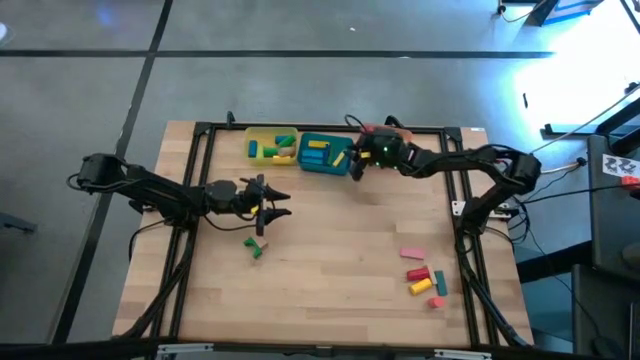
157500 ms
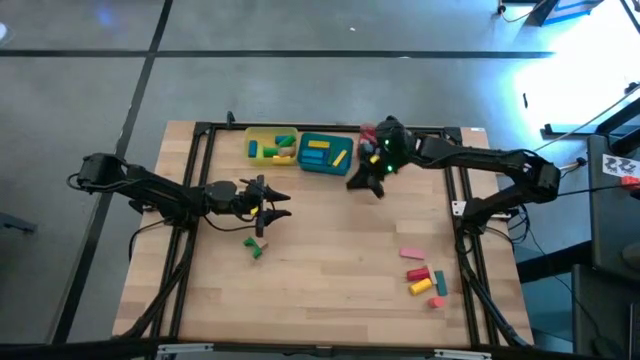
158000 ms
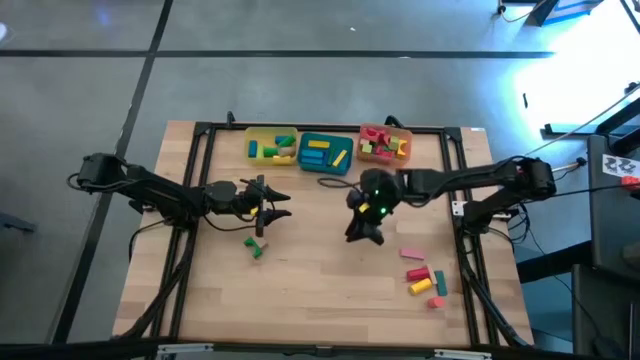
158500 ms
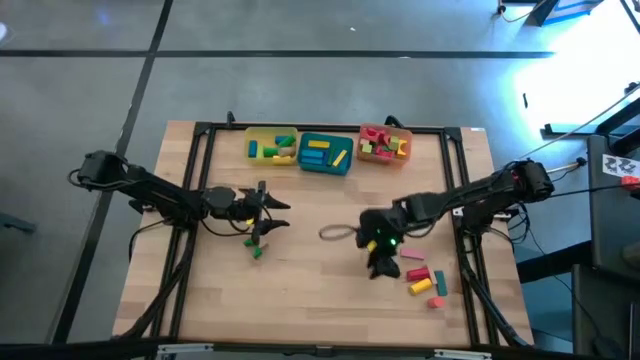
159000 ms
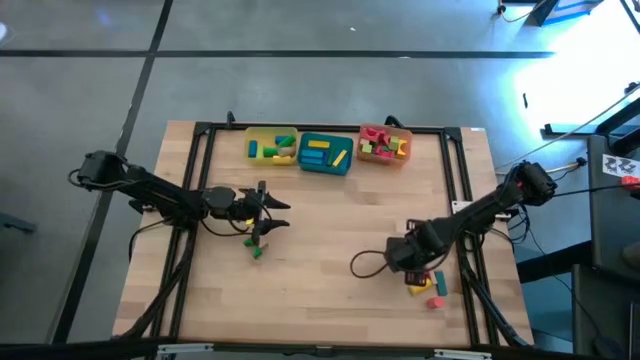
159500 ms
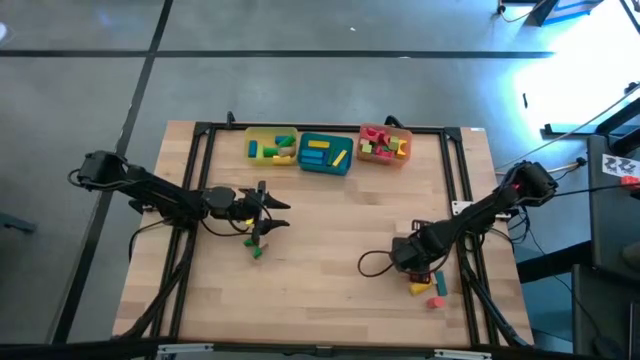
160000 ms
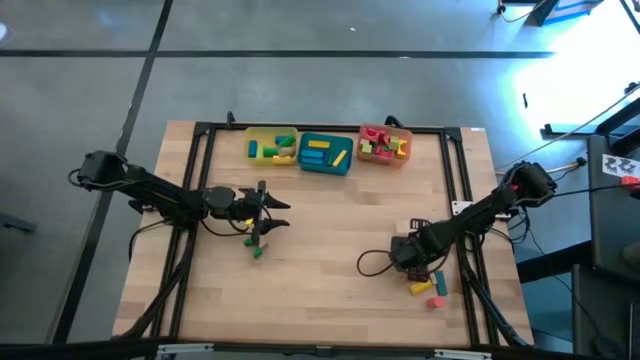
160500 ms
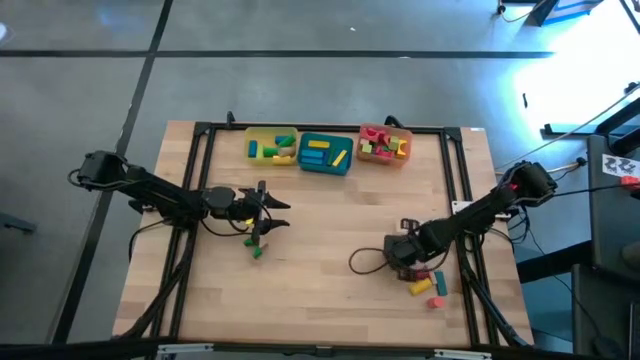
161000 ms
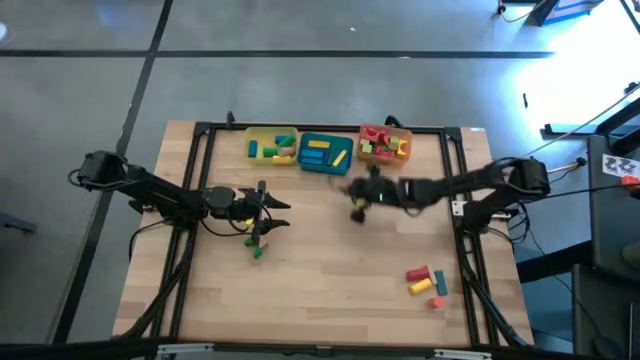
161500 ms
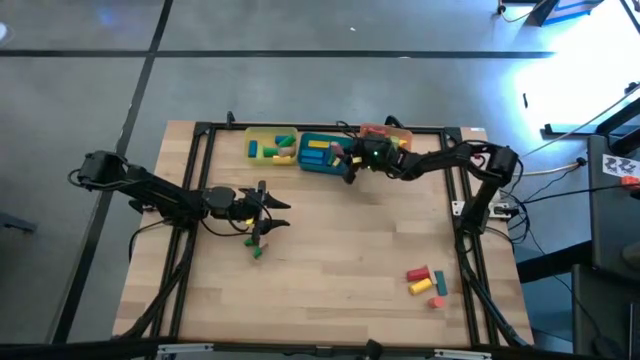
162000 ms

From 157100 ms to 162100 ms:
Task: Sort blocks by size
Put the pink rectangle block into the blue bin

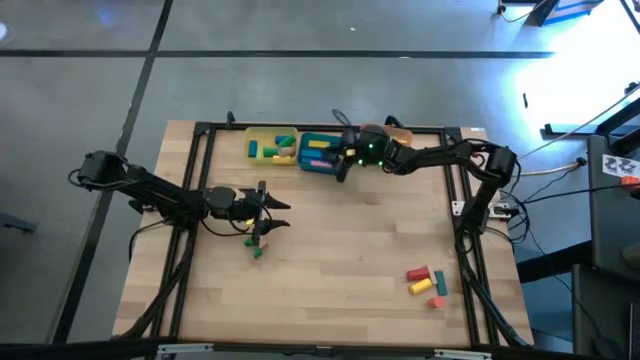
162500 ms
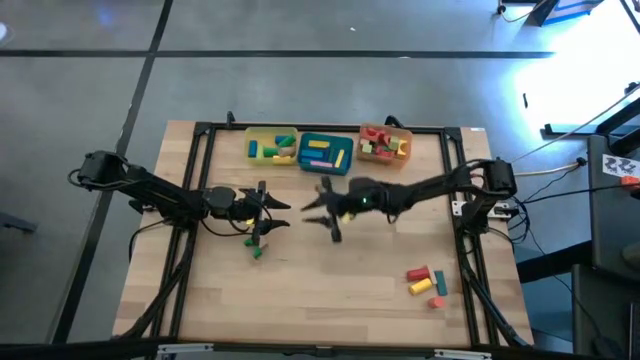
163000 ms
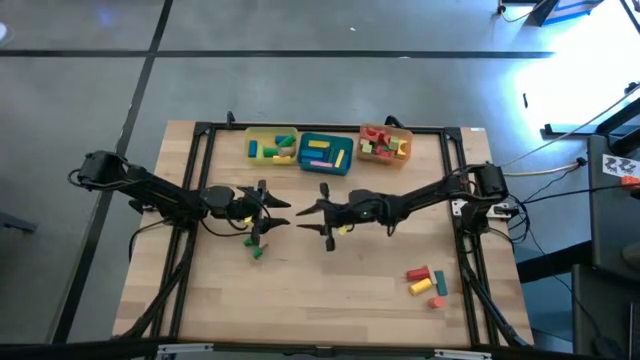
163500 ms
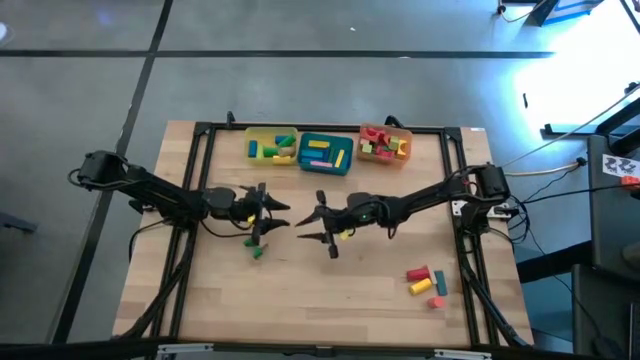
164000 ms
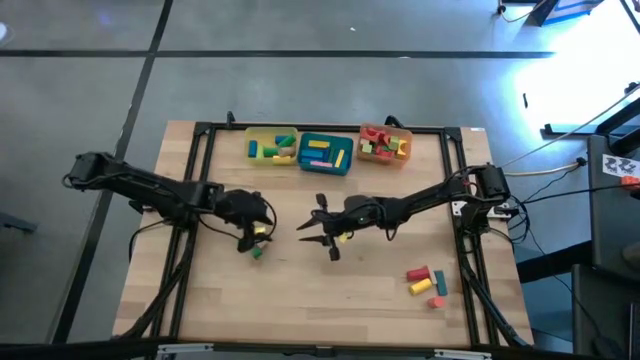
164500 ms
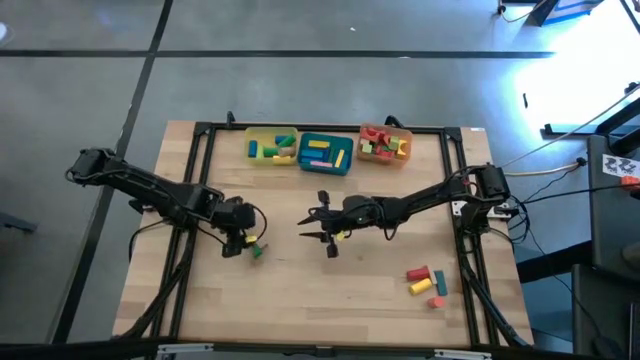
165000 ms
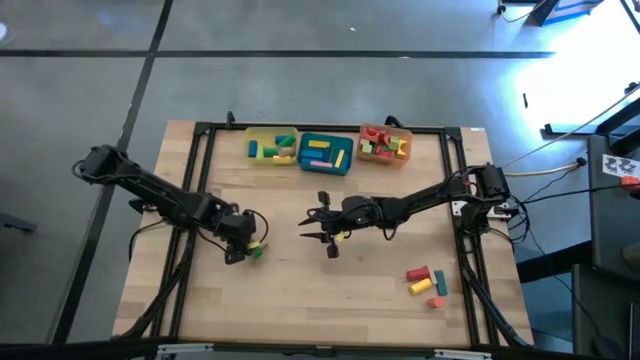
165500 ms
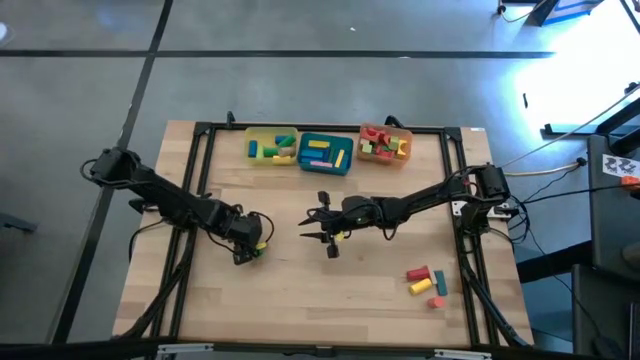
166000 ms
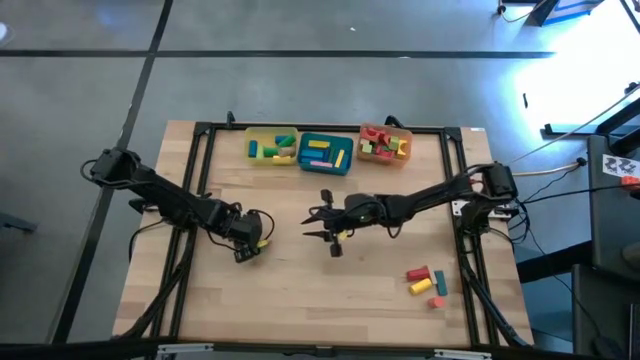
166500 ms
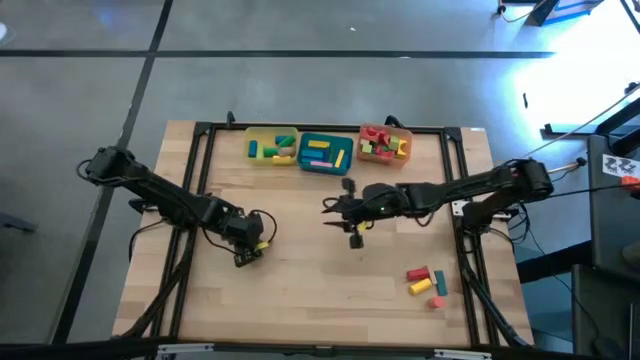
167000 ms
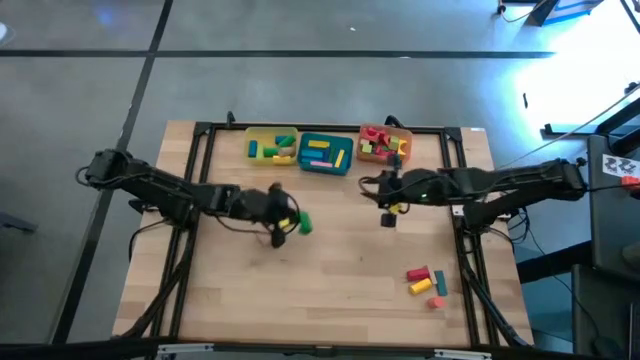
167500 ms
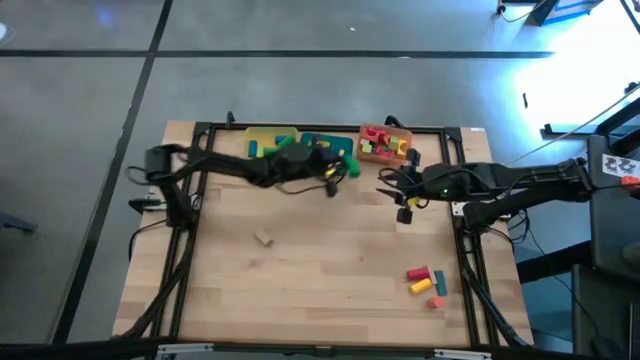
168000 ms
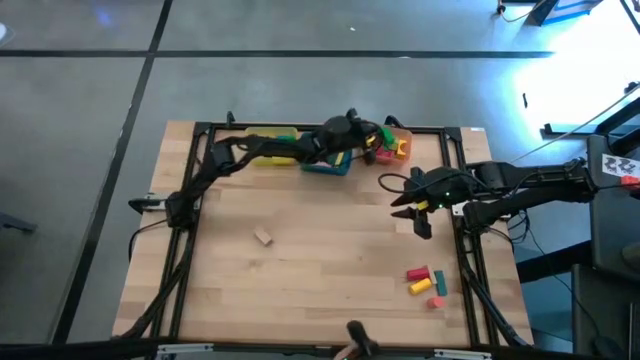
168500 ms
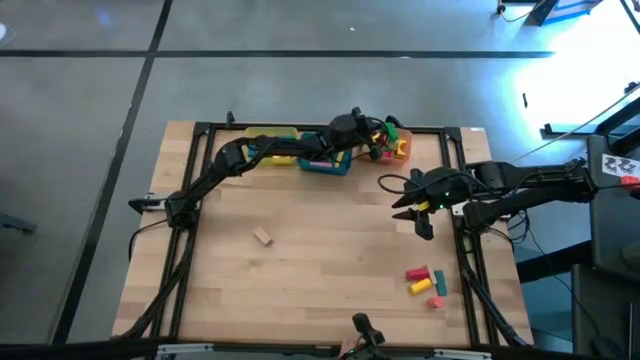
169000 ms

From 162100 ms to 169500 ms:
Put the green arch block into the orange bin

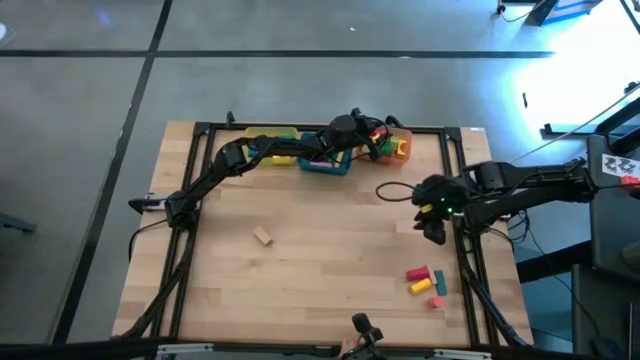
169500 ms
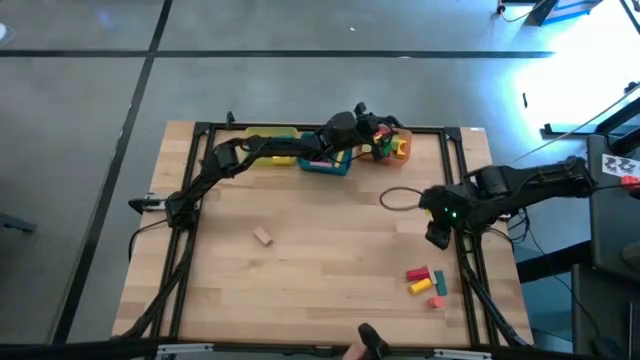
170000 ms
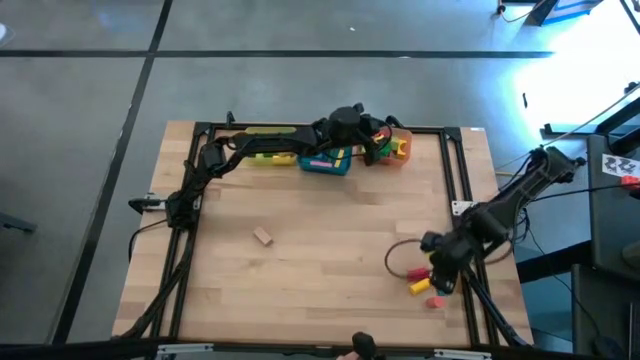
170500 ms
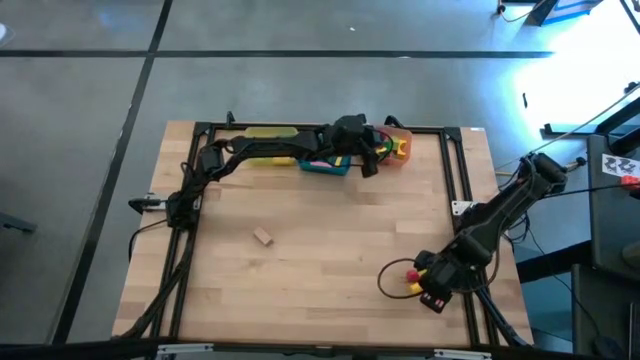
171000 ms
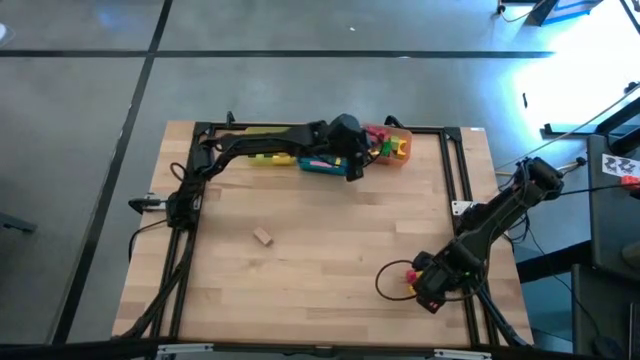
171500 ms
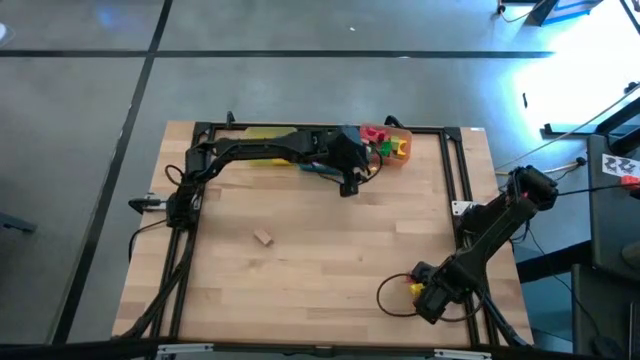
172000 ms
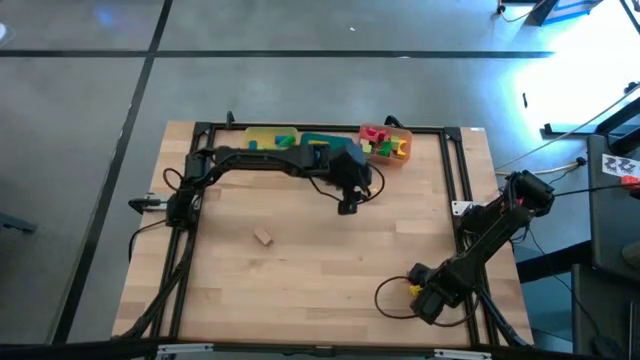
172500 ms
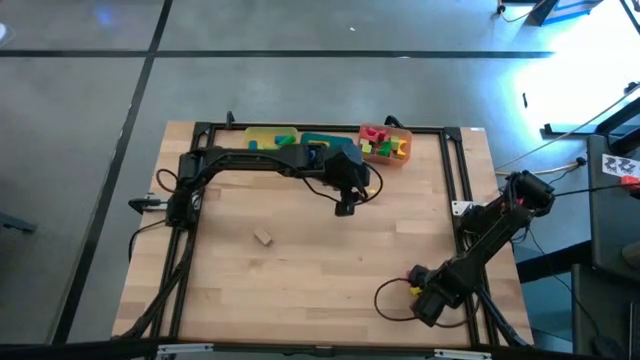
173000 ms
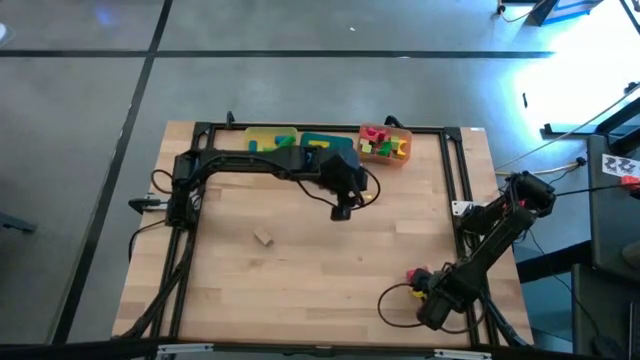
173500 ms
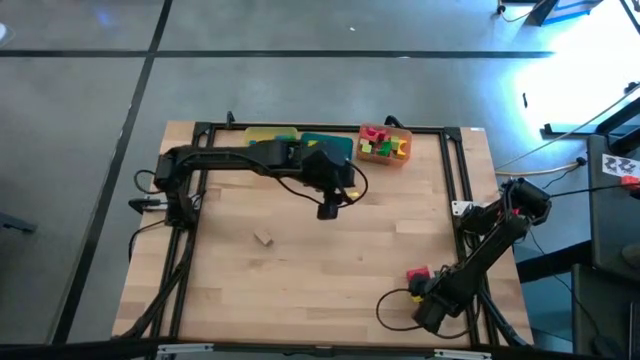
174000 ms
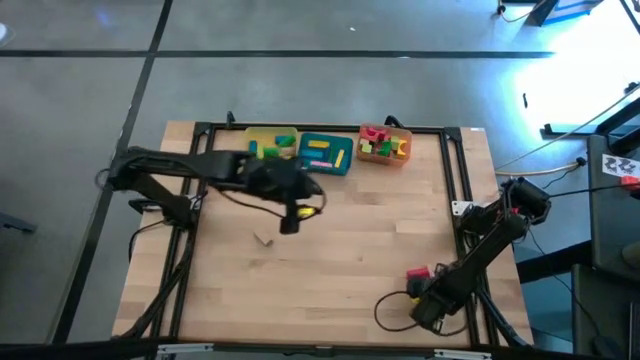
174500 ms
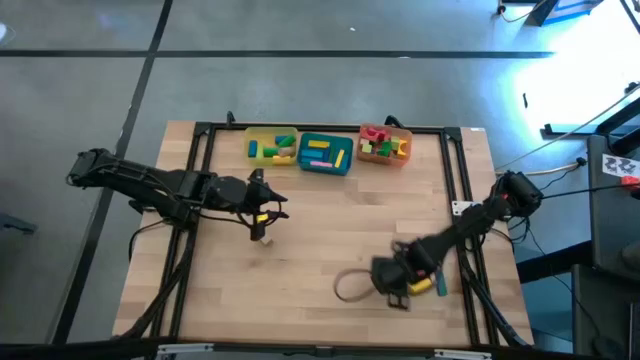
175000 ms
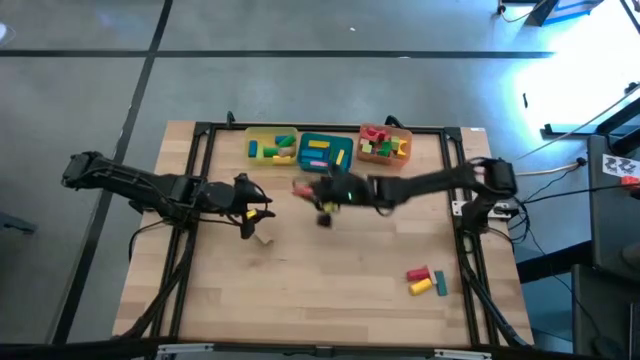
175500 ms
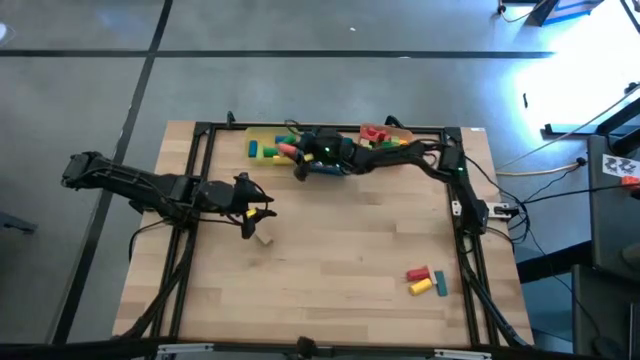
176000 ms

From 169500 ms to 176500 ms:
Put the orange cylindrical block into the yellow bin

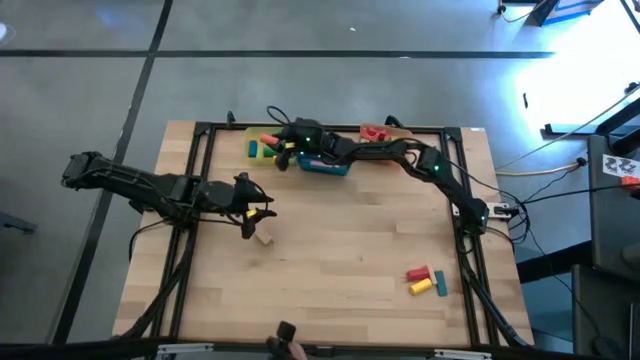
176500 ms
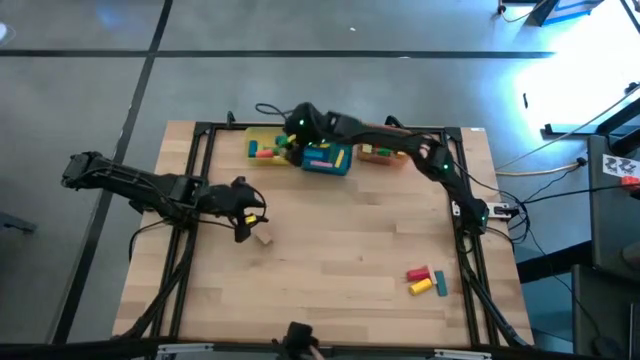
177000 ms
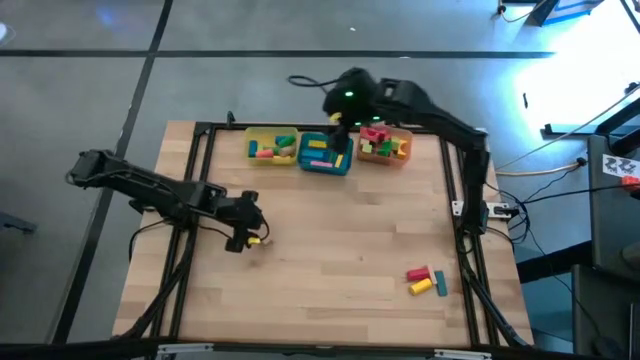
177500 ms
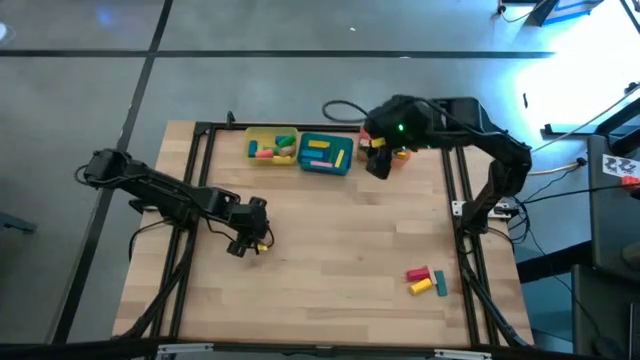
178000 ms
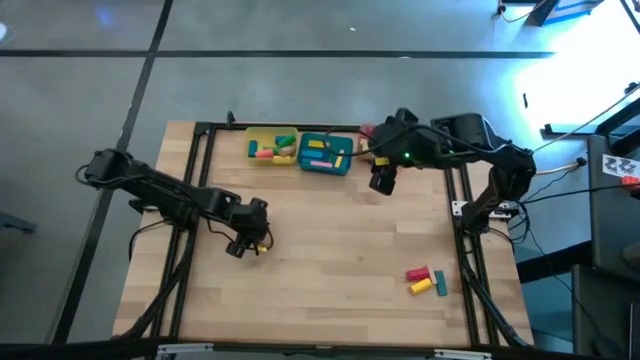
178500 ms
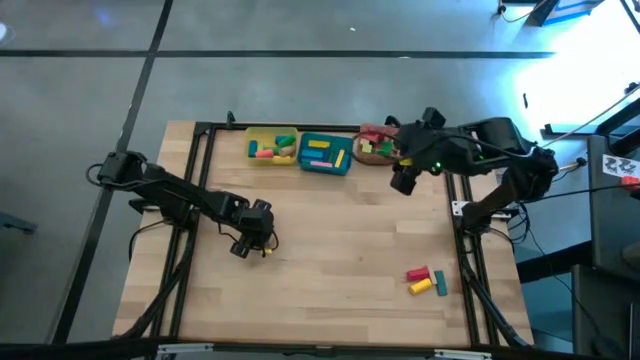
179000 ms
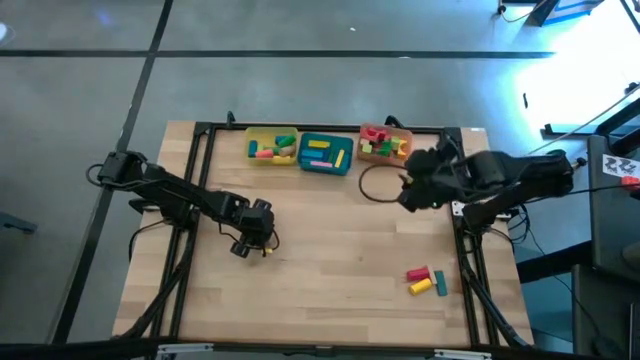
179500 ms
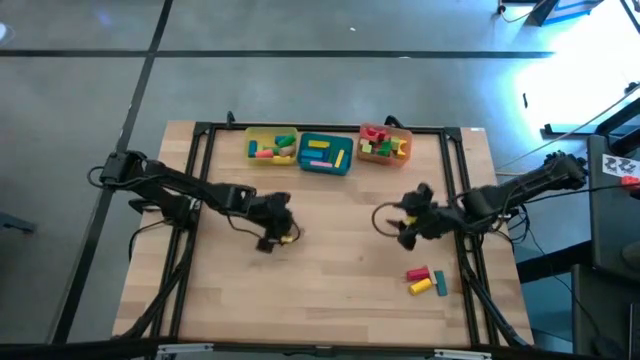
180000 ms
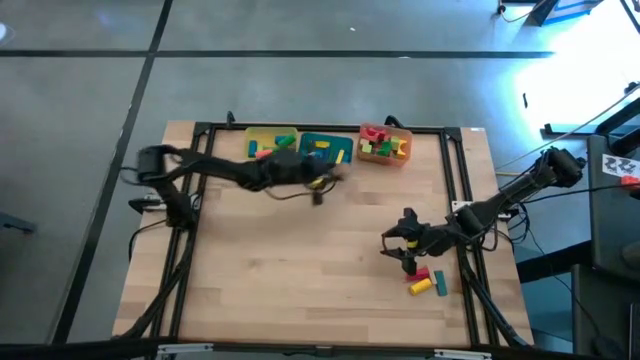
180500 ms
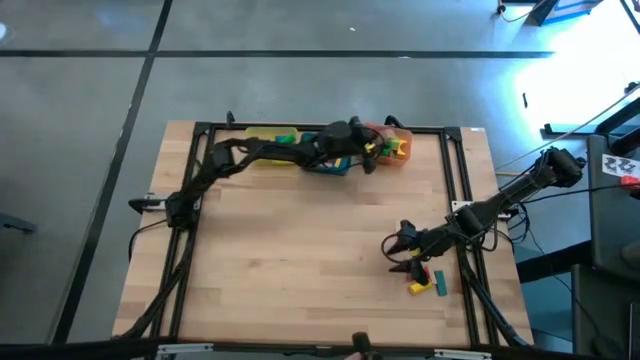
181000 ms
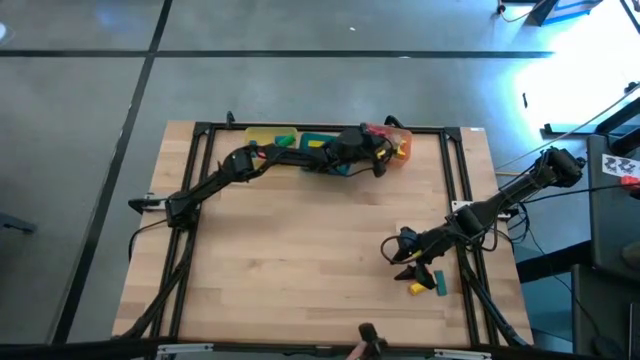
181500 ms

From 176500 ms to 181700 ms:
Put the brown arch block into the orange bin
